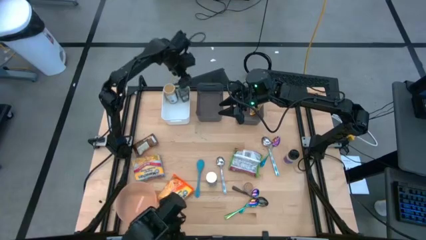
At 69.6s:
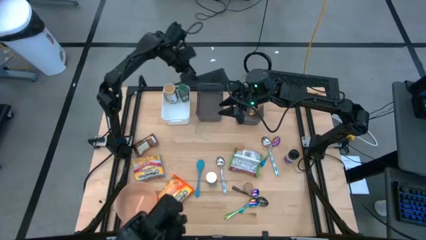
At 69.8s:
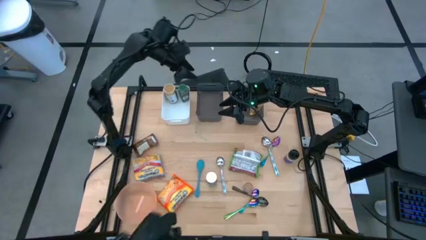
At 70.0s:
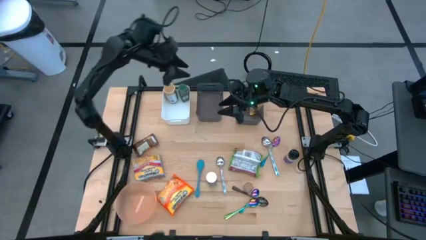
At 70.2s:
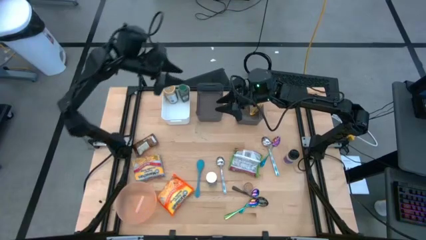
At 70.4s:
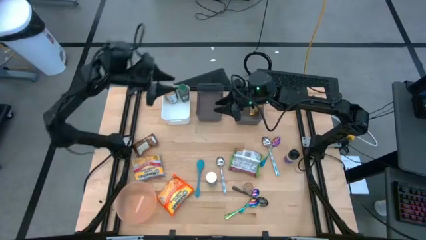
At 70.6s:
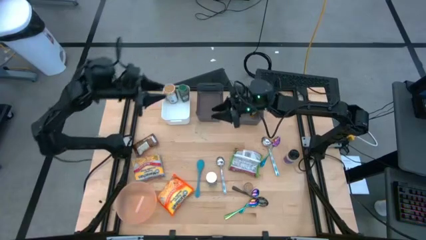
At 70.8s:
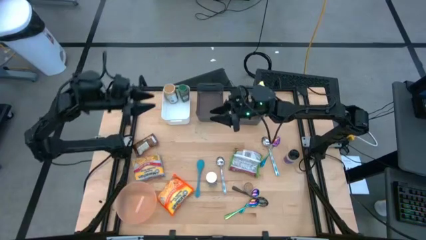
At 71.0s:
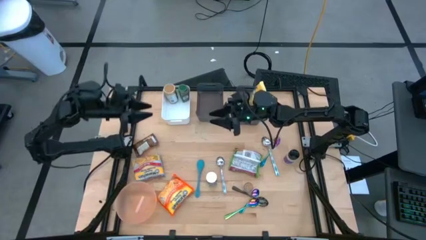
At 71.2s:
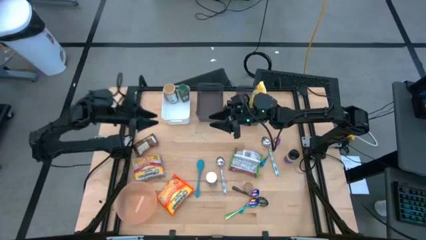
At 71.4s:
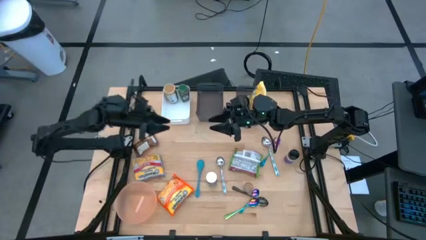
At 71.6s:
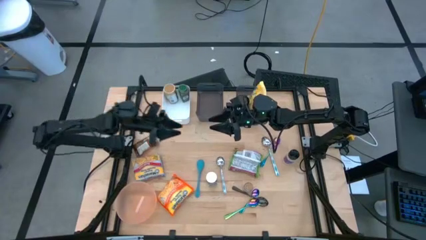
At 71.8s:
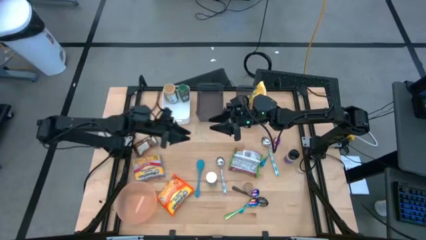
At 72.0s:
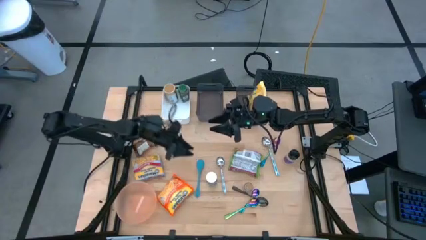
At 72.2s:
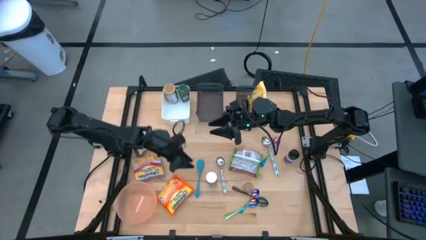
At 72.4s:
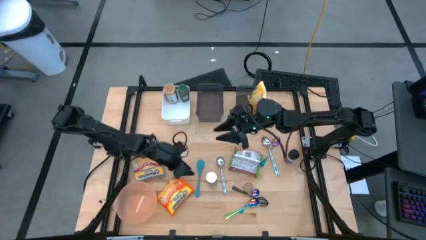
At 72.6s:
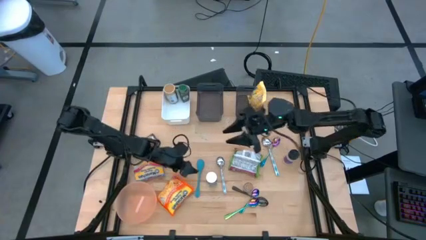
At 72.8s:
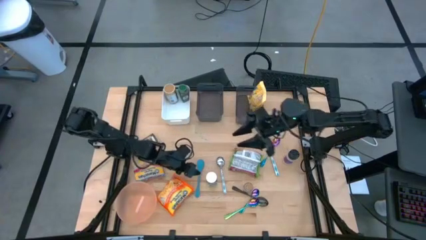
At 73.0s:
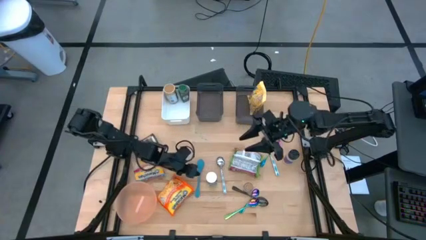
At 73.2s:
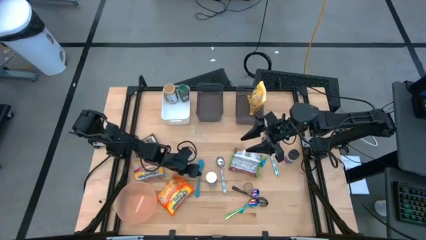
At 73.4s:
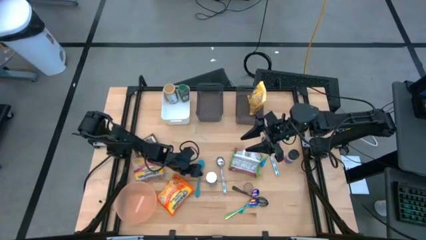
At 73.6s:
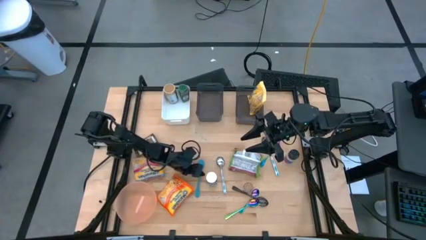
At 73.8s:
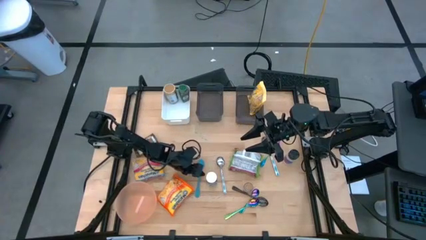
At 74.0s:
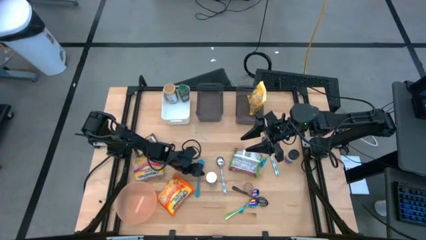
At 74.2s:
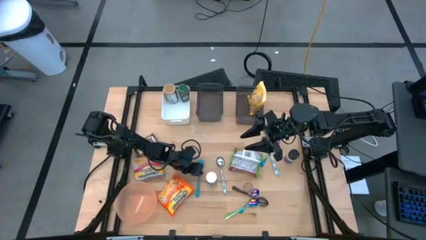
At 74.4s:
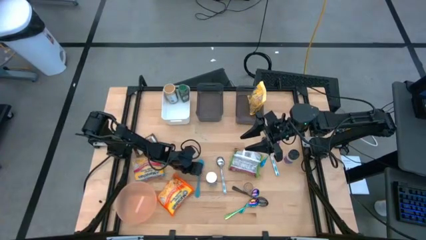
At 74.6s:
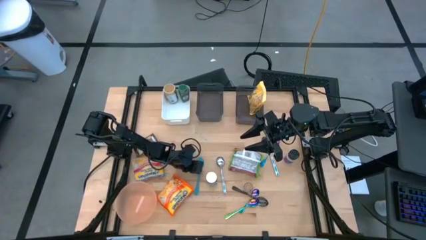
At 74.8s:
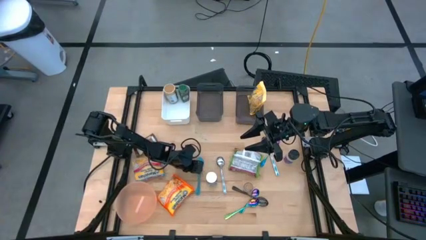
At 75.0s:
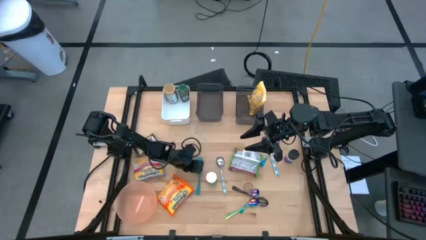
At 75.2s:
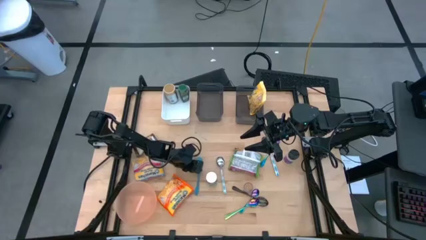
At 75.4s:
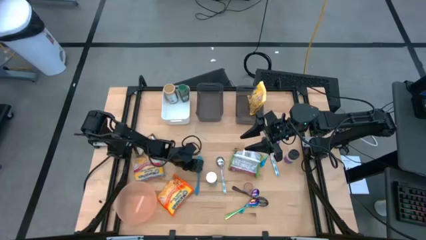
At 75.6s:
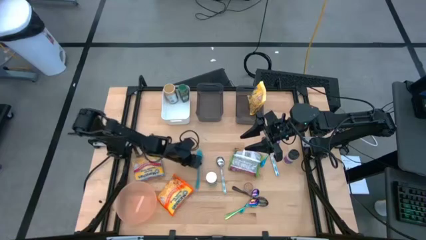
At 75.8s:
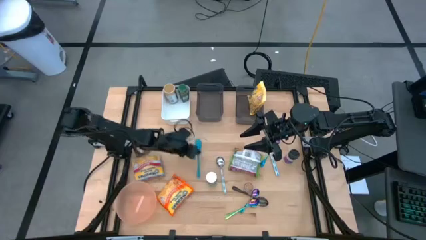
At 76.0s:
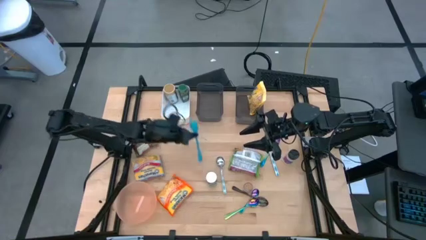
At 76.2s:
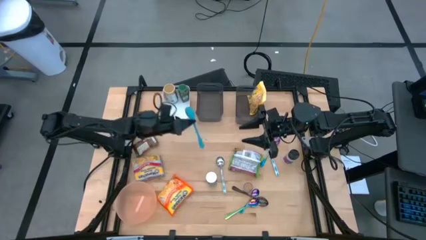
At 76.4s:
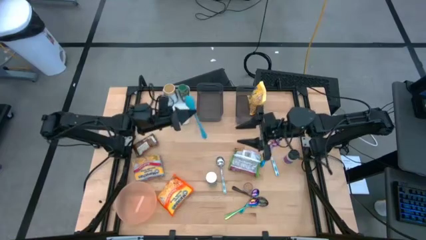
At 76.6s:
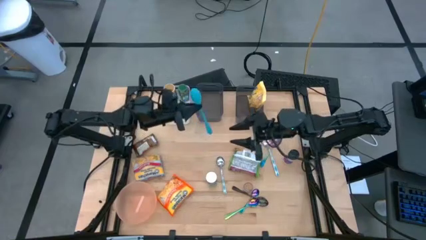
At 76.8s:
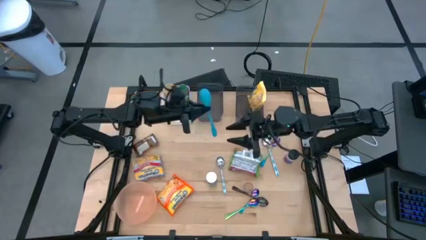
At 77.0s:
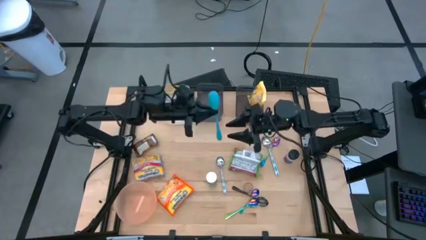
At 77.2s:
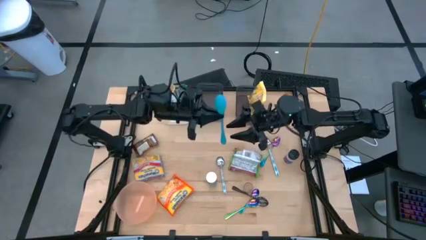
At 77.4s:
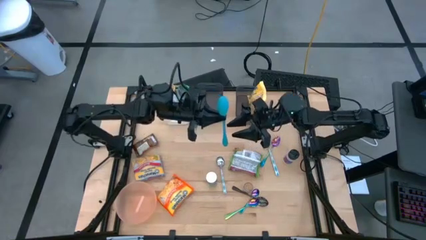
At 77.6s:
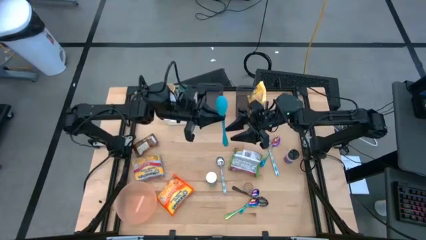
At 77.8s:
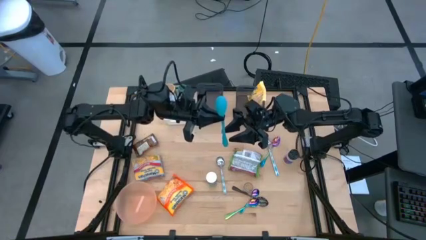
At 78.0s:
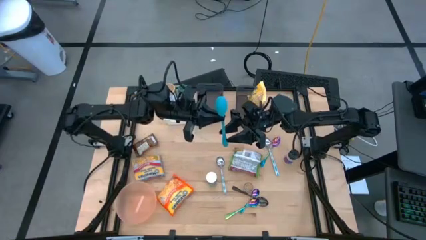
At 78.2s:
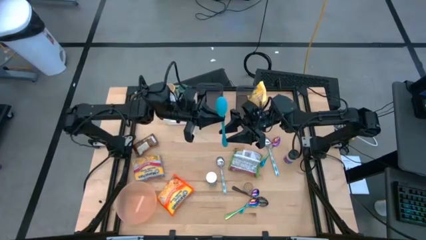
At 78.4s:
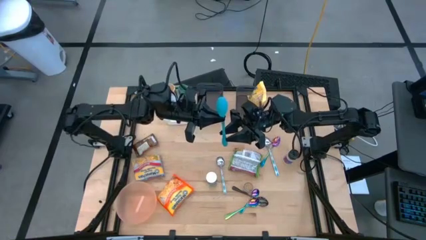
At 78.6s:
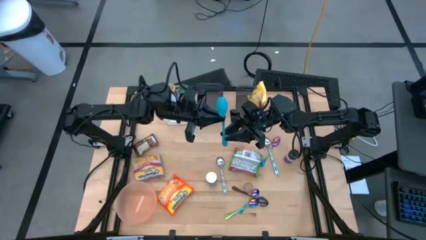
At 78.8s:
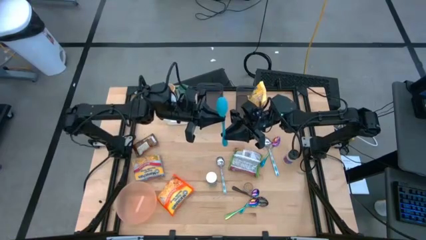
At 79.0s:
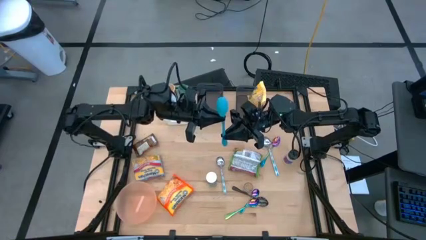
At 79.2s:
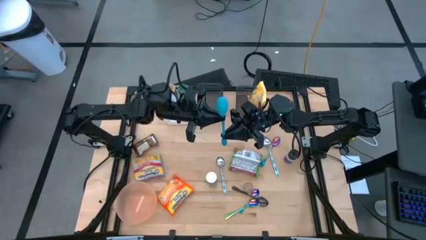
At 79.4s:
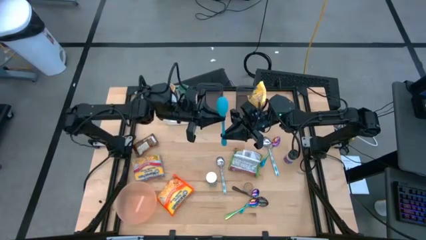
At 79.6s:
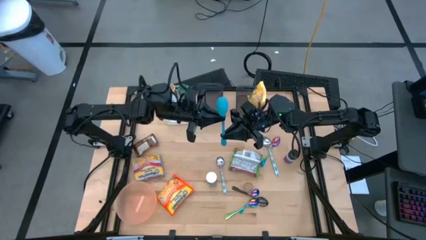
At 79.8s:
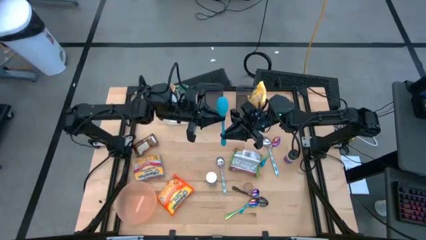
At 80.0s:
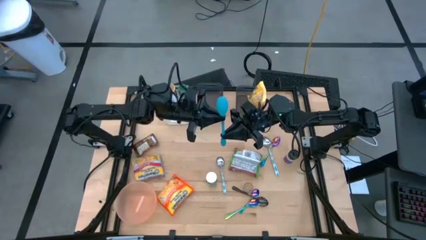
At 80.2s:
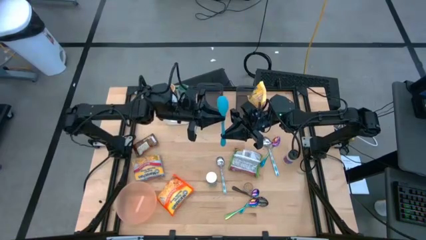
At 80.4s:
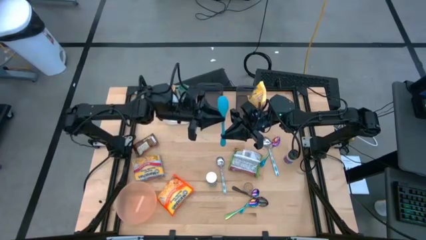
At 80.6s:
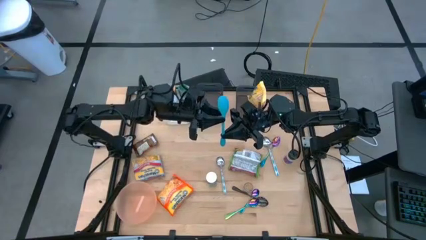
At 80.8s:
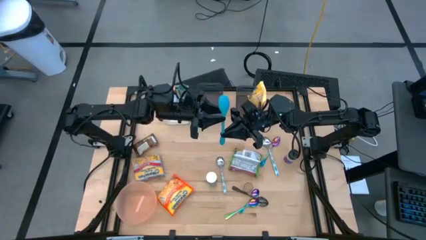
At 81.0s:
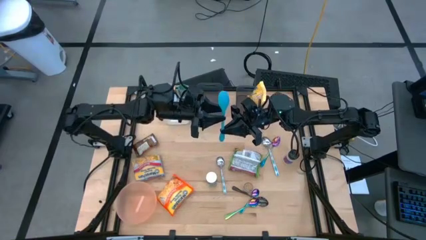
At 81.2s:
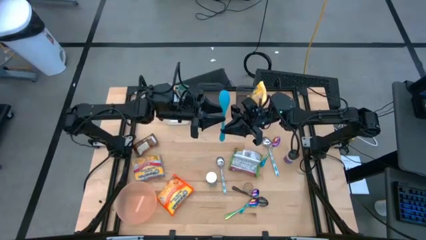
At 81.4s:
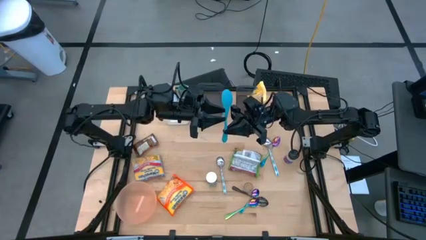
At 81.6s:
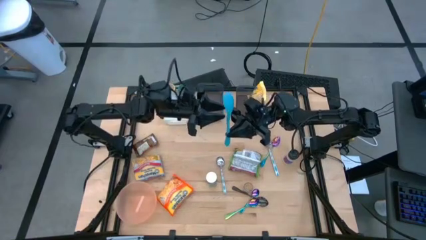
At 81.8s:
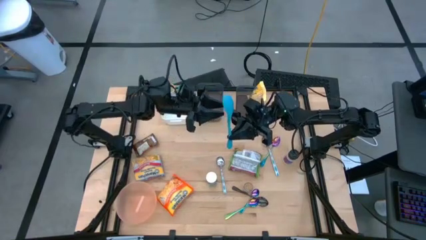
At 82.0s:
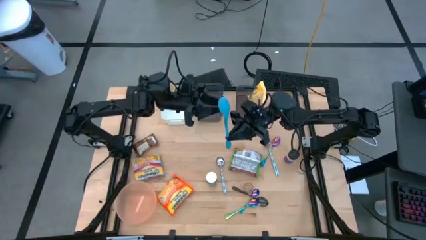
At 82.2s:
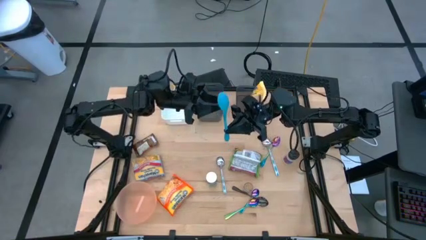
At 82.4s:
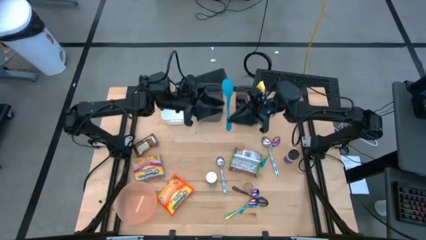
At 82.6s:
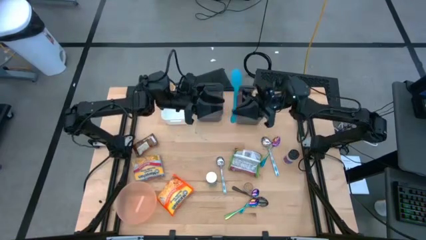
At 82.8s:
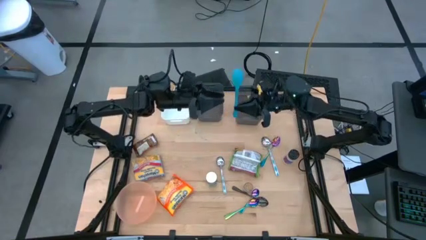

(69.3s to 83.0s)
Task: Pick & Place Food Item
Put the blue baby spoon into the left black bin
